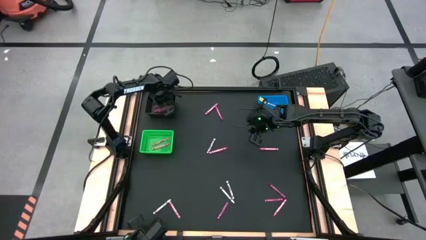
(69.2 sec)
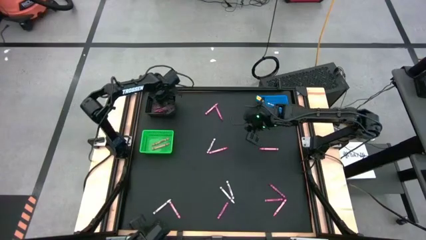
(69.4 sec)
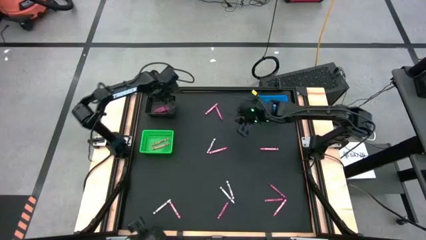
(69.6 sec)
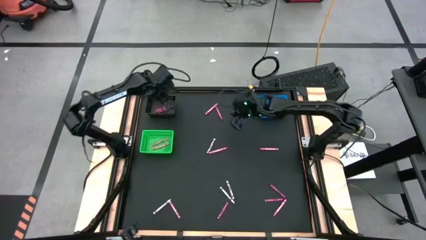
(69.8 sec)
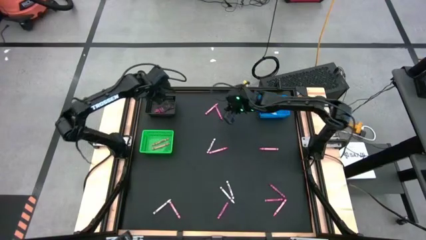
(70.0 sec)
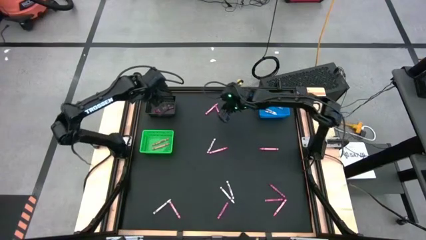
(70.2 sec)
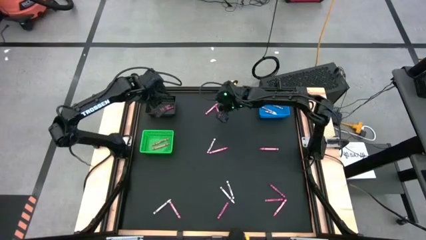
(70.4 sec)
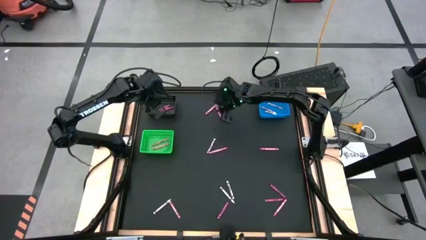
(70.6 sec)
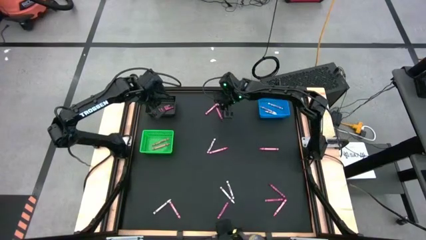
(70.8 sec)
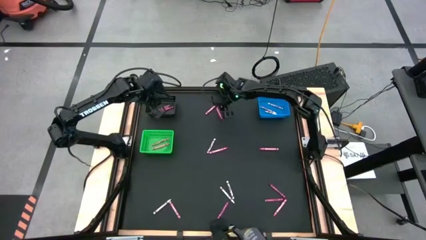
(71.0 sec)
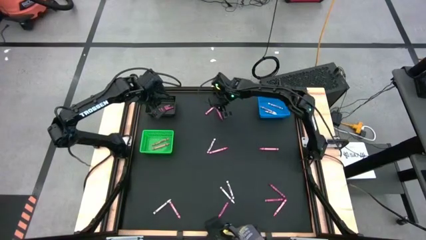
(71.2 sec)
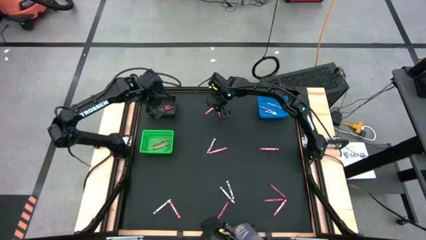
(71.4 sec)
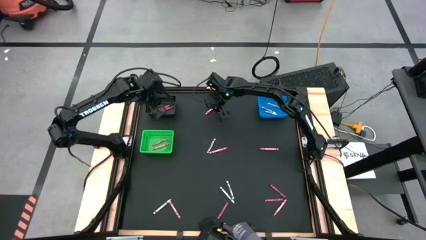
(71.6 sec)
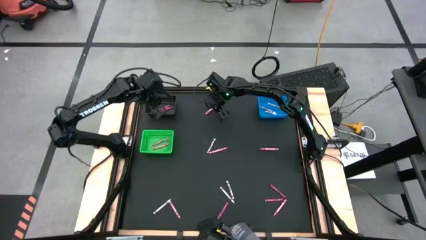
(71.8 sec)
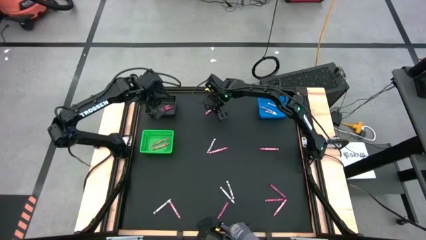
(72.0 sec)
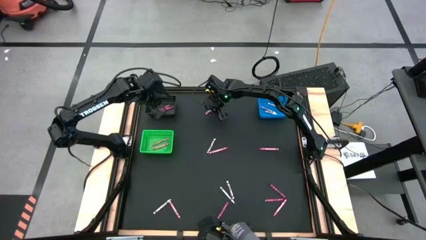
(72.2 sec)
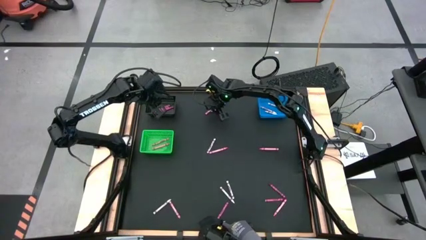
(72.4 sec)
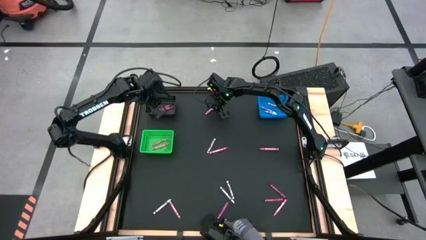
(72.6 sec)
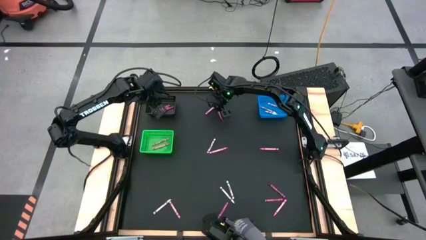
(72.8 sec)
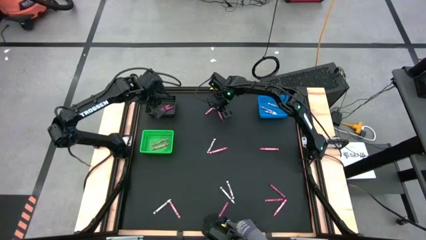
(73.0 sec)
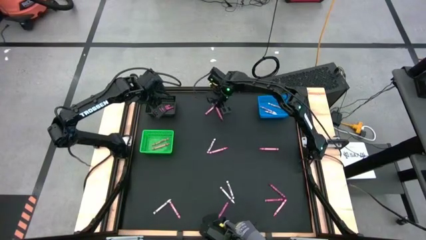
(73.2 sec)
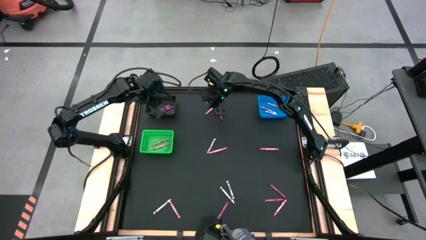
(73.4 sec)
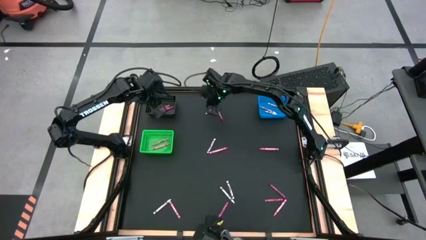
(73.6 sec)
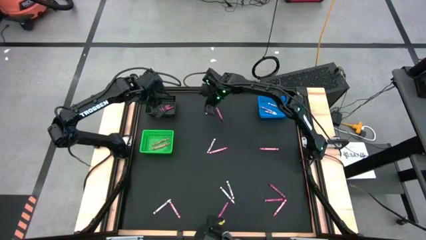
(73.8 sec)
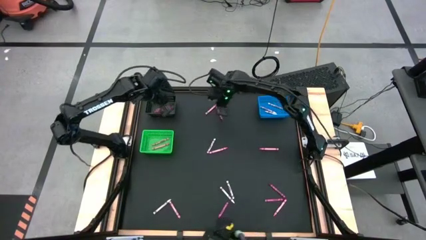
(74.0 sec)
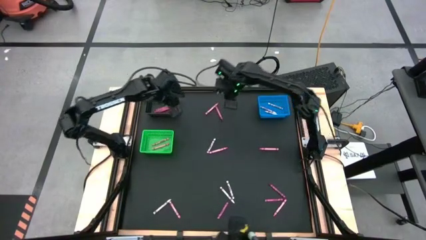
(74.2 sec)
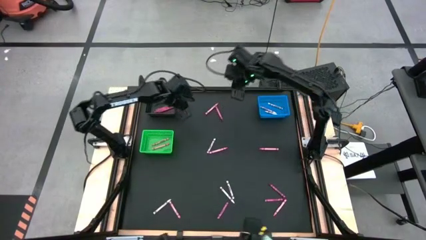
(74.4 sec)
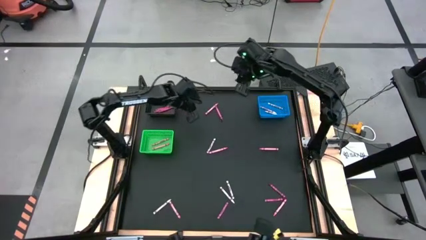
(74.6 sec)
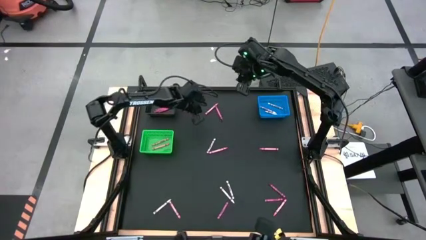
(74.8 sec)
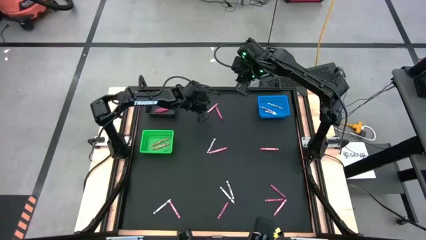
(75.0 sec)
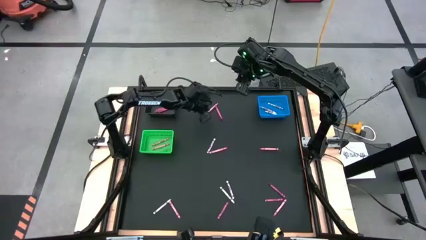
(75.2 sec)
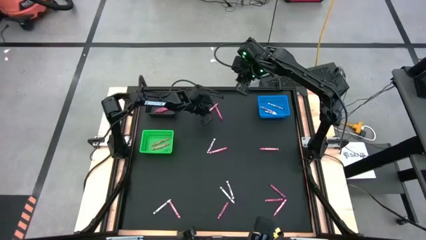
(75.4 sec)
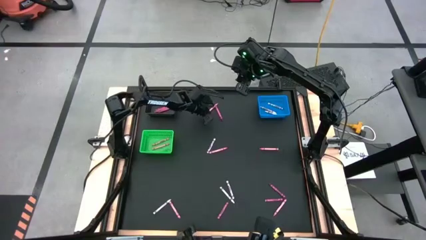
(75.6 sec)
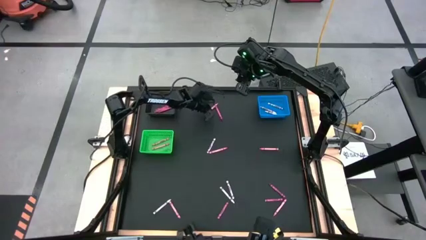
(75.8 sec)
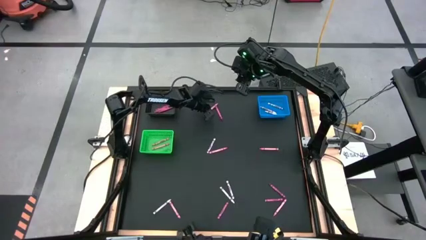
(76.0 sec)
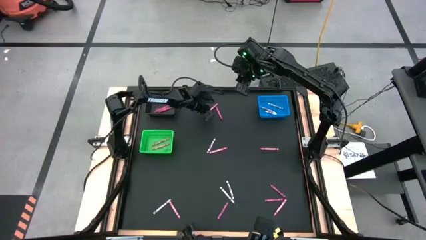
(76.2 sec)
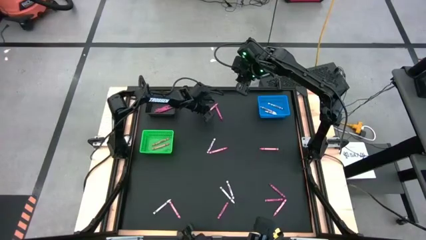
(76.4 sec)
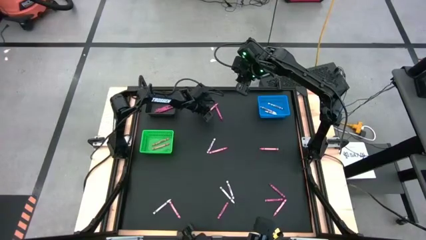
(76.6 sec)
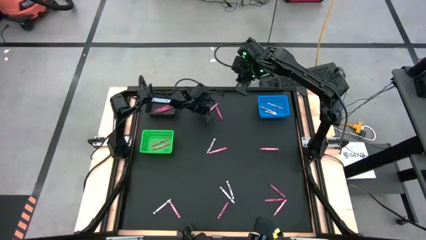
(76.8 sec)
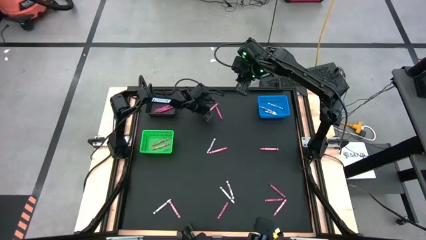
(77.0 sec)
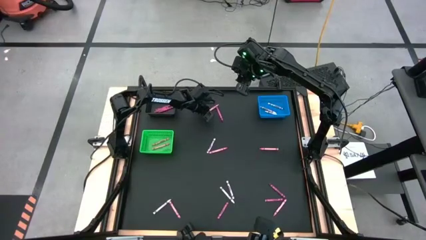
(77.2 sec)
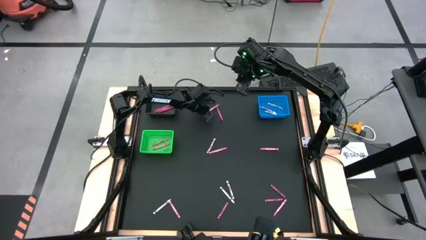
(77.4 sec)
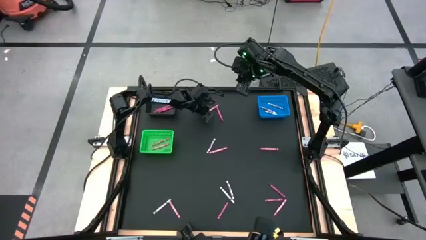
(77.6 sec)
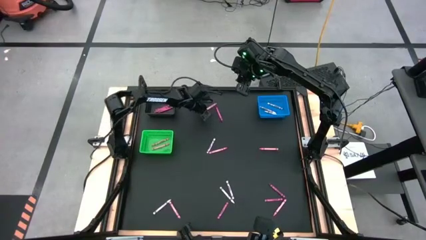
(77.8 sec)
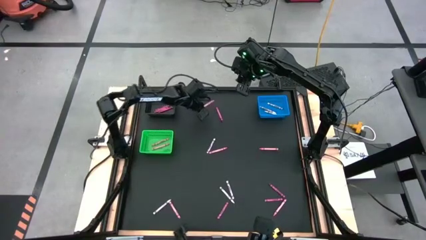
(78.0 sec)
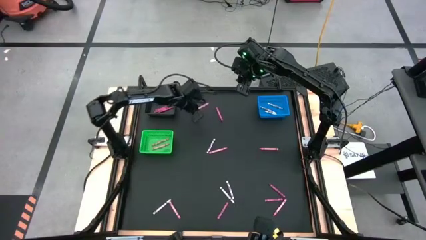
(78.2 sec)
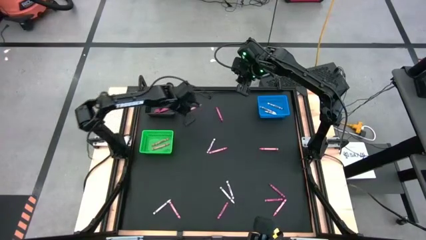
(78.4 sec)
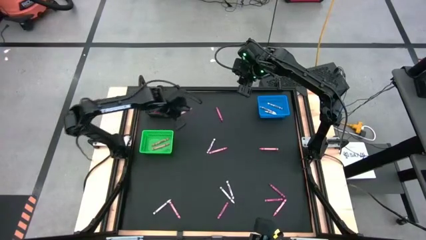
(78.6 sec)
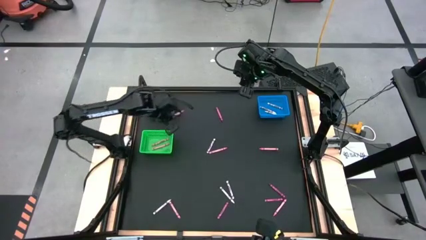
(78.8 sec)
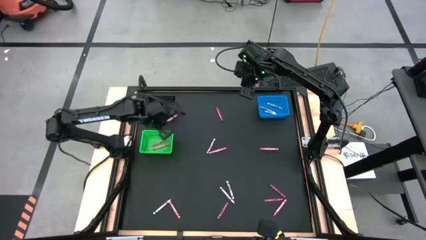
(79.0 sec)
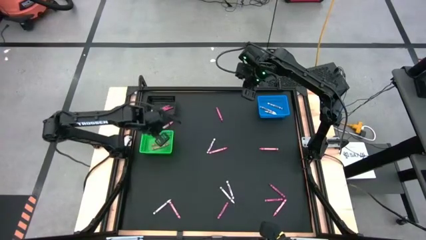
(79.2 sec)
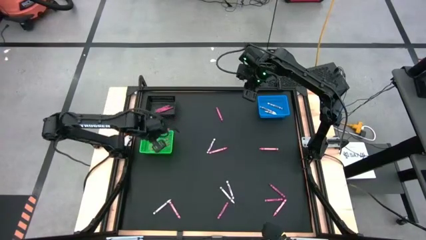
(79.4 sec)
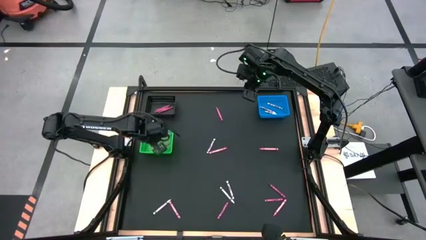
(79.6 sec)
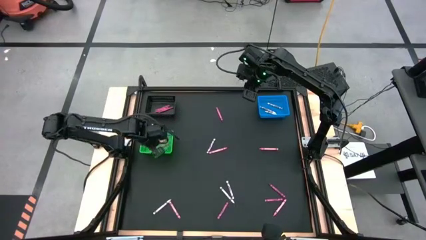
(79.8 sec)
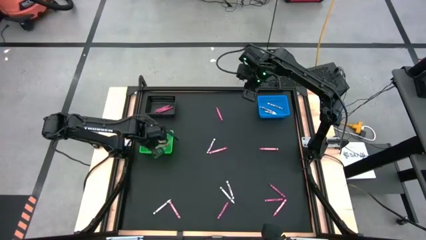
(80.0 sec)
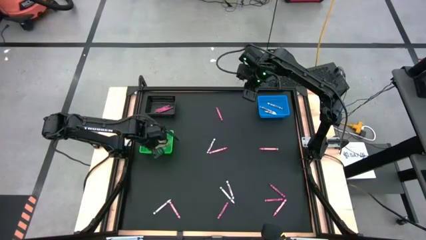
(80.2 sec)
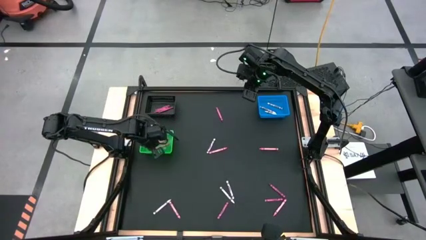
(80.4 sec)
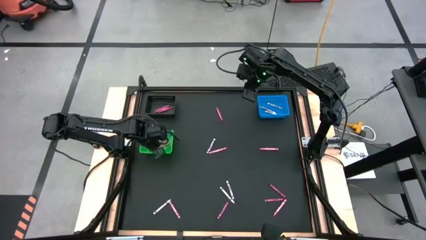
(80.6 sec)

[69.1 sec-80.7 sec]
Task: Sort crayons
Put the pink crayon into the green bin

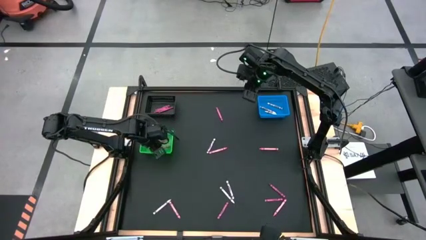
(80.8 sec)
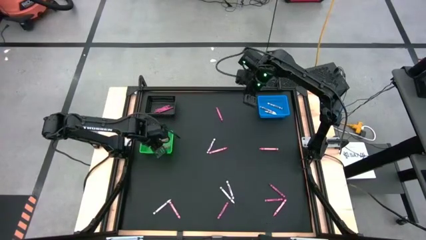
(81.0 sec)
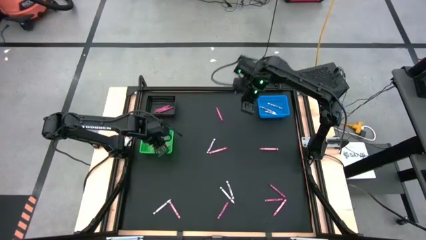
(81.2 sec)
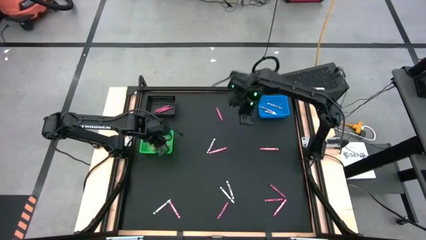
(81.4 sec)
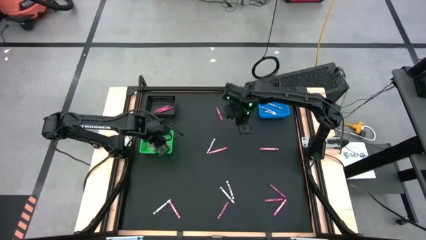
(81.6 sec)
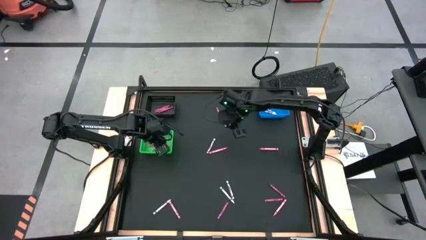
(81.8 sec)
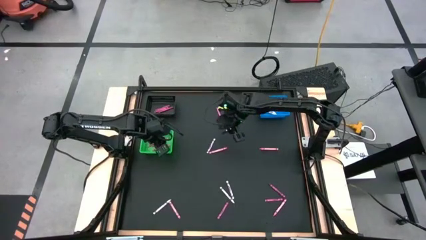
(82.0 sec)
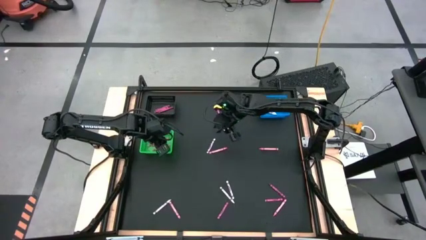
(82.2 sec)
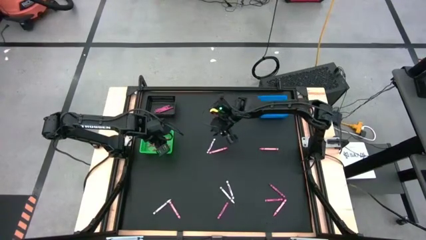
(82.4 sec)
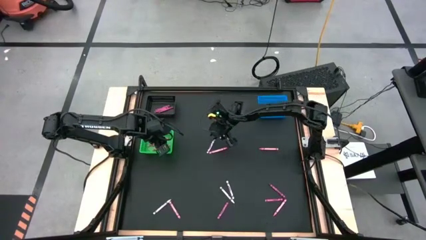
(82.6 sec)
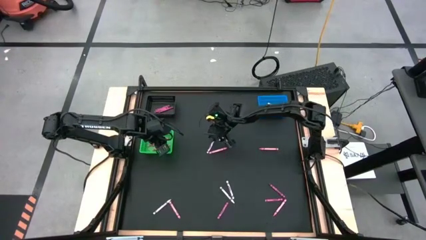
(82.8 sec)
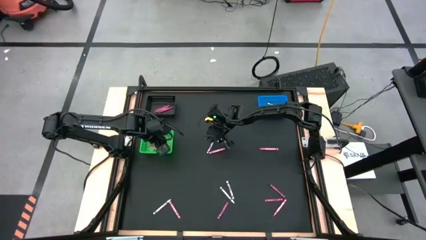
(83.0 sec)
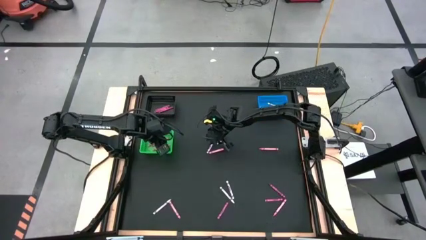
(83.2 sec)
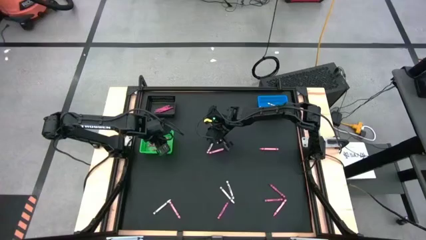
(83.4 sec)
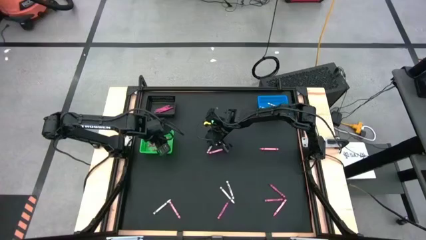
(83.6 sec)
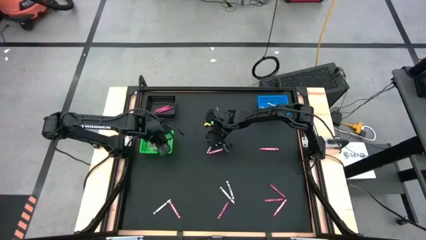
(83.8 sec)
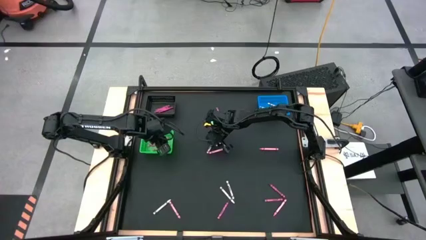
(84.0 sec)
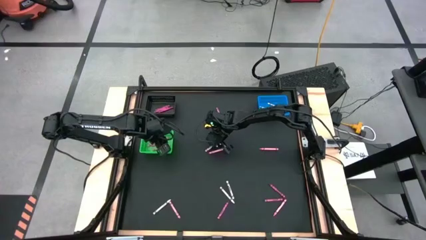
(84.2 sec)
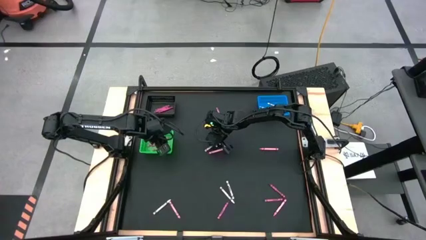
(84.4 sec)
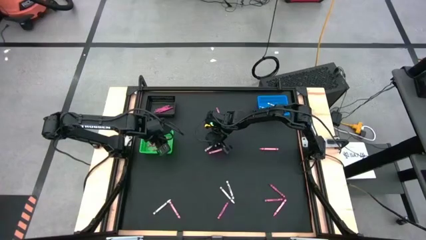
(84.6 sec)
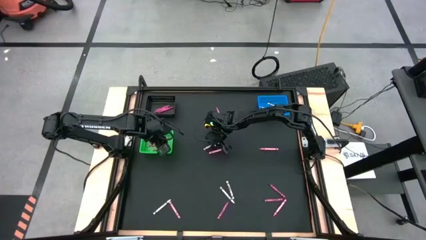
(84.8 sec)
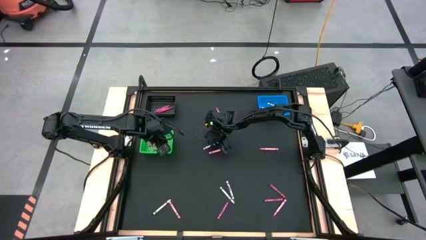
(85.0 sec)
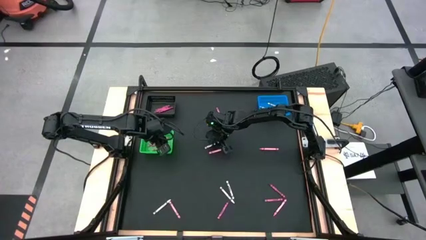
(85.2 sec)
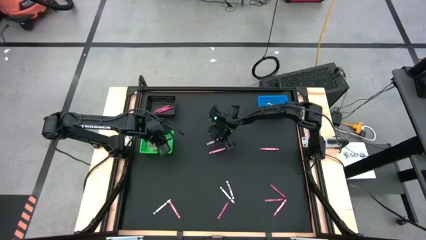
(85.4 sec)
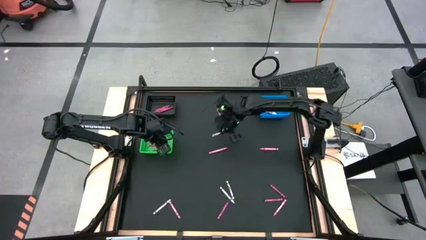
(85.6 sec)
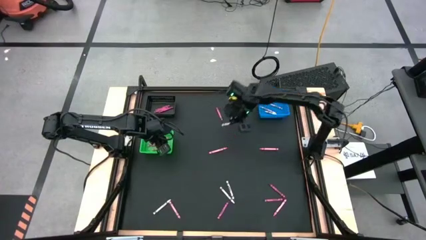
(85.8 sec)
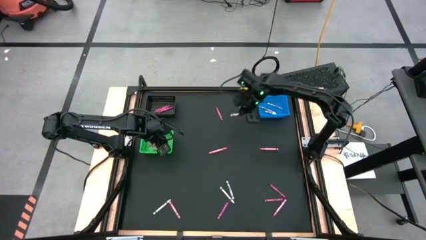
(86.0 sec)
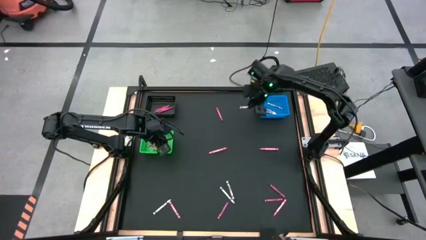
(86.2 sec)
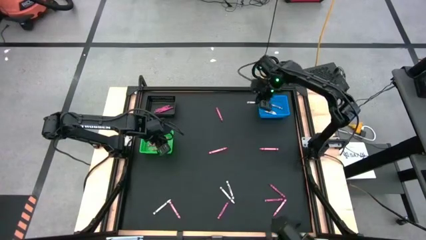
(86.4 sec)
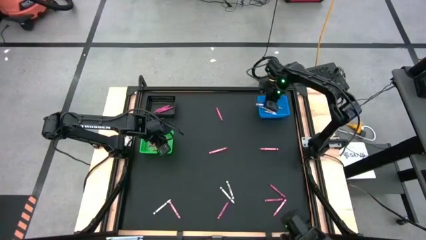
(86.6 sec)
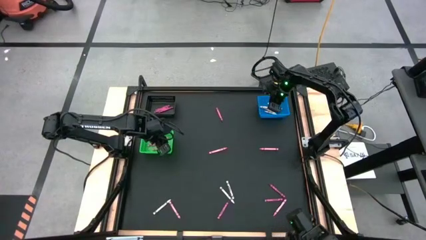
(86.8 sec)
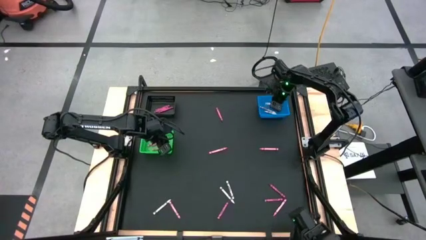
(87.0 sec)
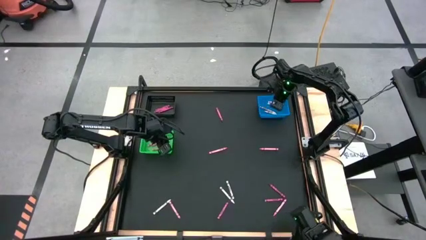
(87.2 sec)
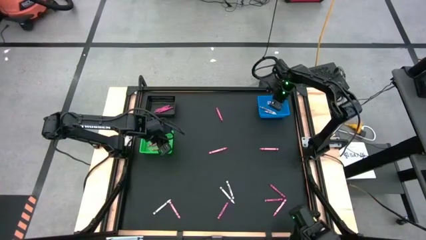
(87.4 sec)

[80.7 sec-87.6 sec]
Put the white crayon into the blue bin
